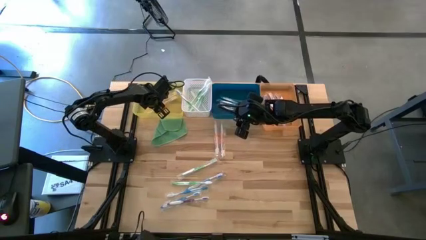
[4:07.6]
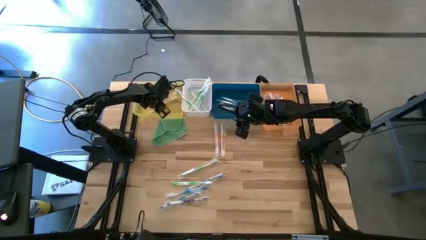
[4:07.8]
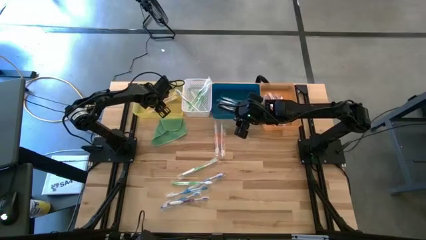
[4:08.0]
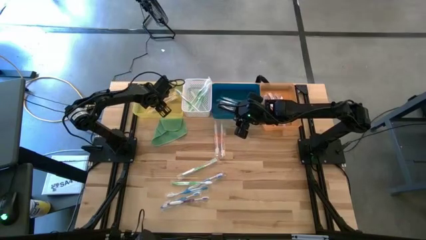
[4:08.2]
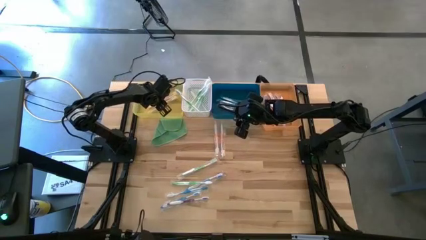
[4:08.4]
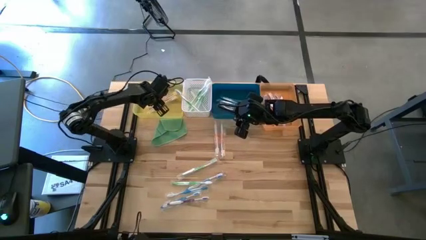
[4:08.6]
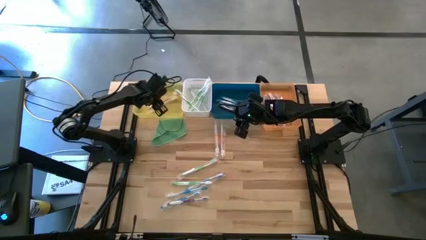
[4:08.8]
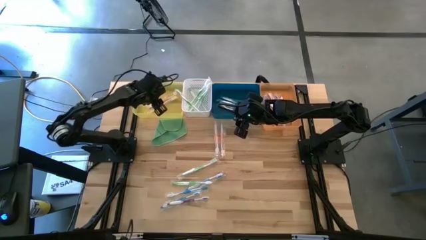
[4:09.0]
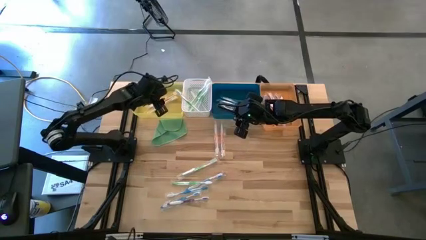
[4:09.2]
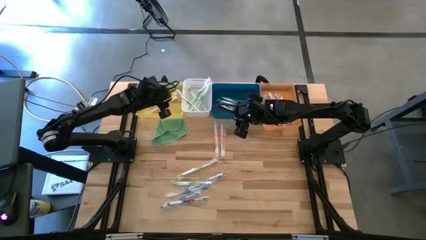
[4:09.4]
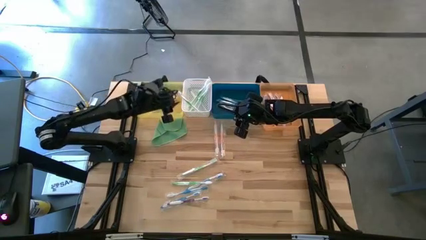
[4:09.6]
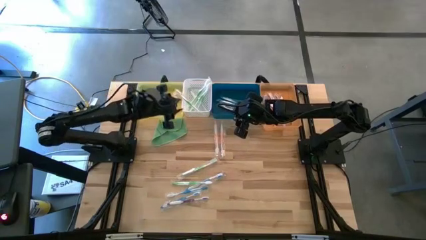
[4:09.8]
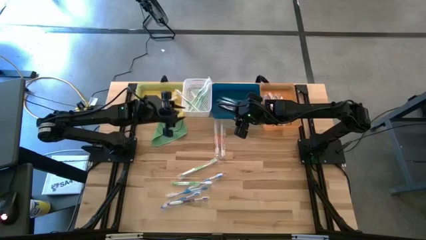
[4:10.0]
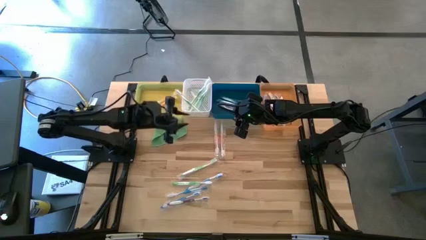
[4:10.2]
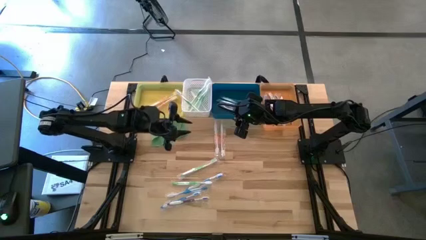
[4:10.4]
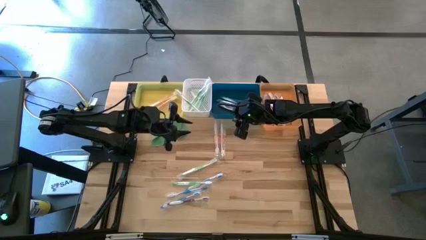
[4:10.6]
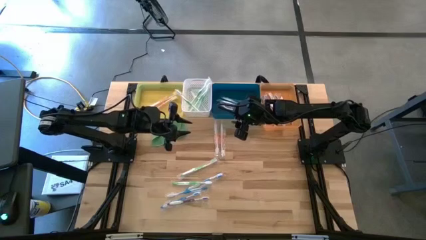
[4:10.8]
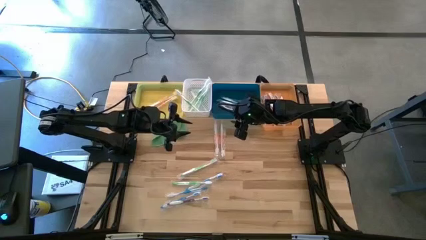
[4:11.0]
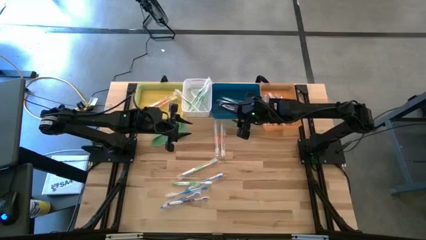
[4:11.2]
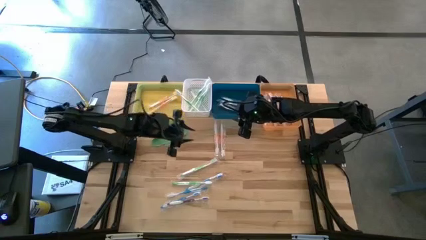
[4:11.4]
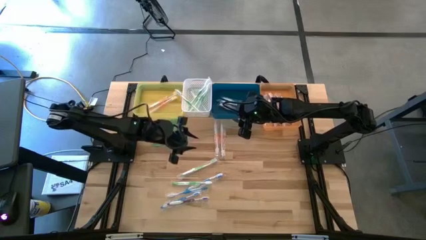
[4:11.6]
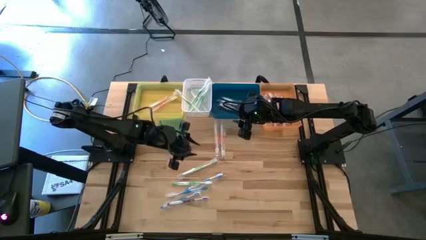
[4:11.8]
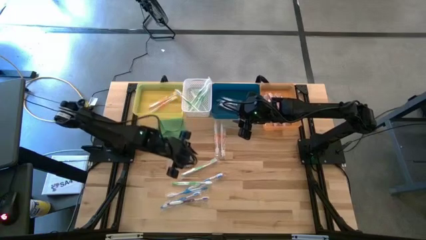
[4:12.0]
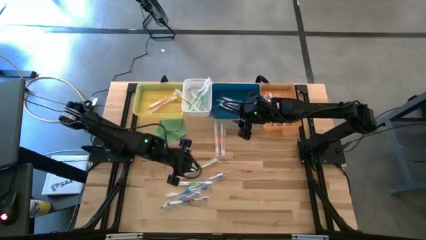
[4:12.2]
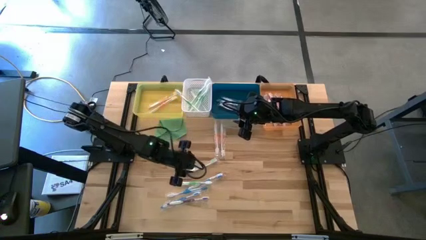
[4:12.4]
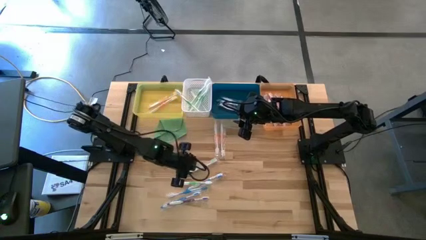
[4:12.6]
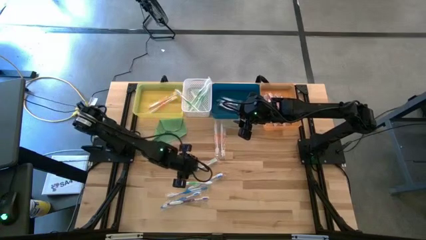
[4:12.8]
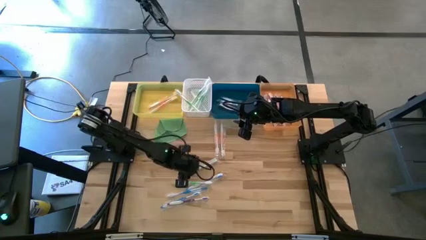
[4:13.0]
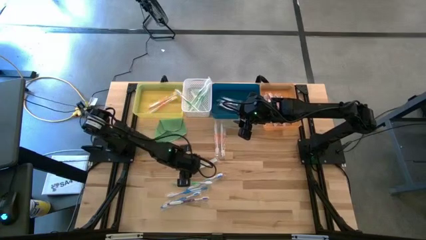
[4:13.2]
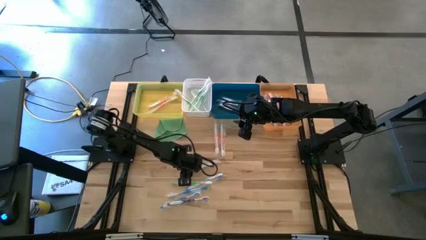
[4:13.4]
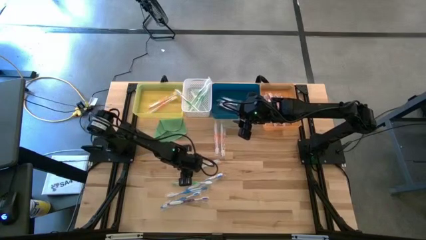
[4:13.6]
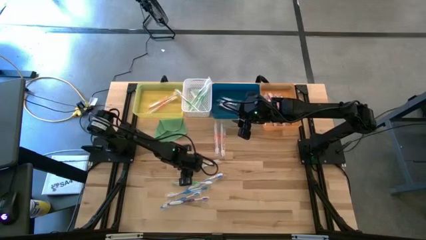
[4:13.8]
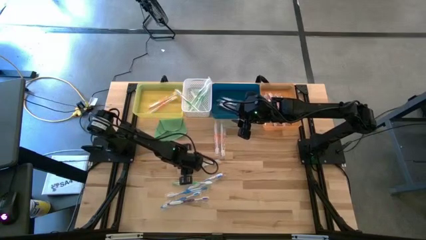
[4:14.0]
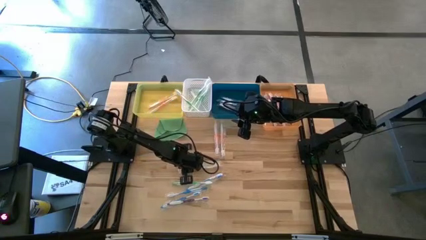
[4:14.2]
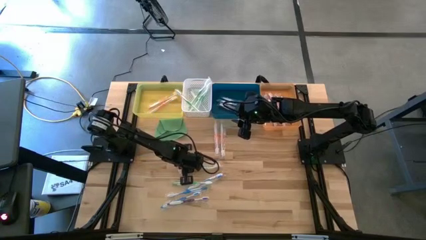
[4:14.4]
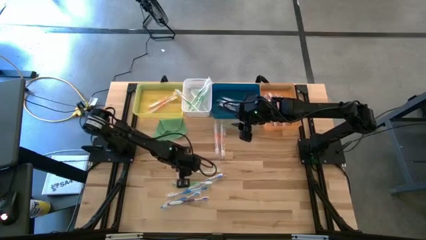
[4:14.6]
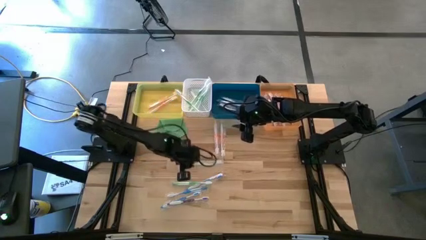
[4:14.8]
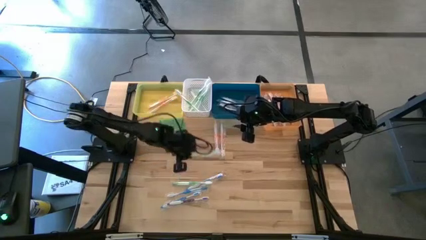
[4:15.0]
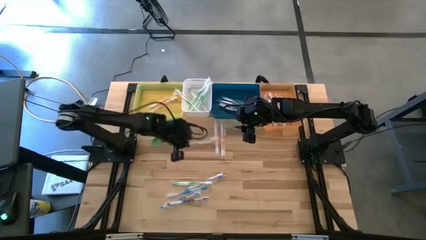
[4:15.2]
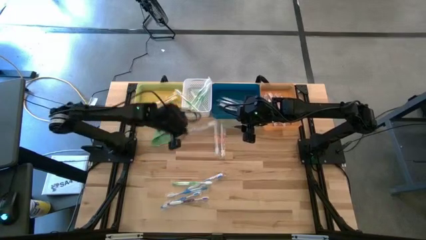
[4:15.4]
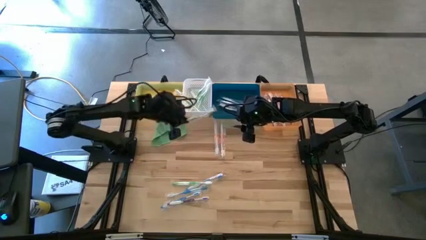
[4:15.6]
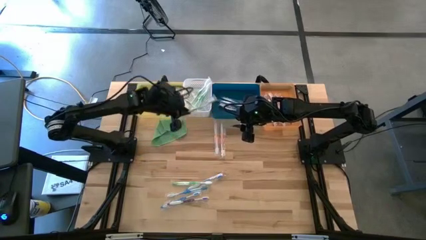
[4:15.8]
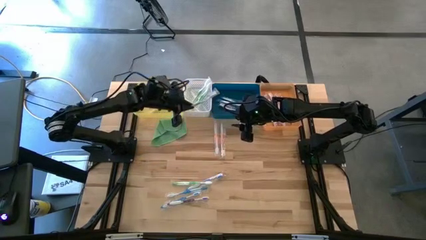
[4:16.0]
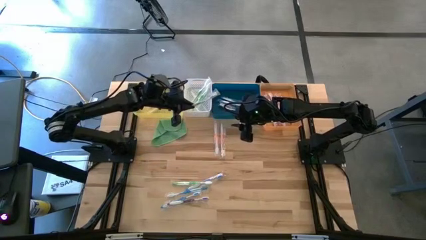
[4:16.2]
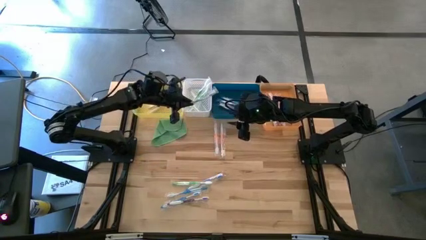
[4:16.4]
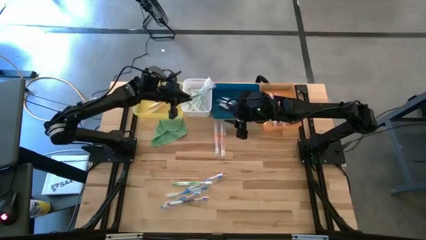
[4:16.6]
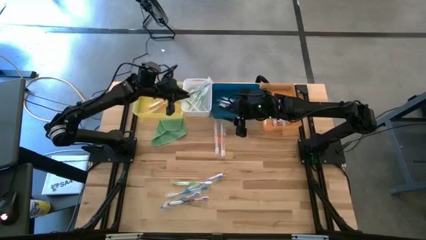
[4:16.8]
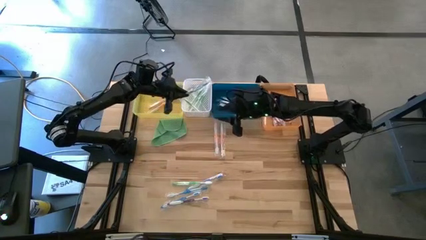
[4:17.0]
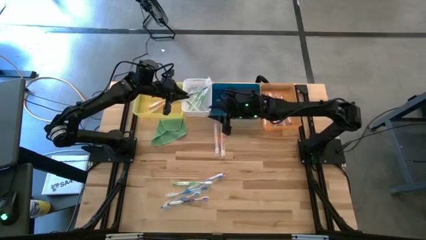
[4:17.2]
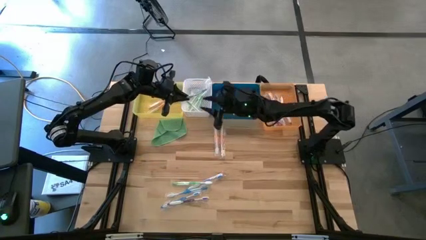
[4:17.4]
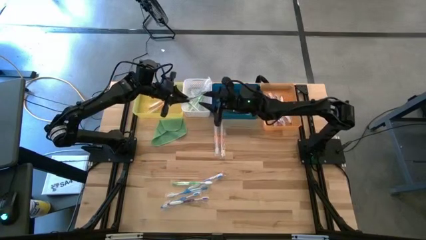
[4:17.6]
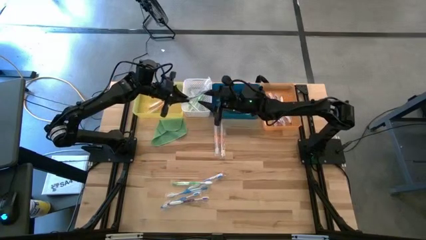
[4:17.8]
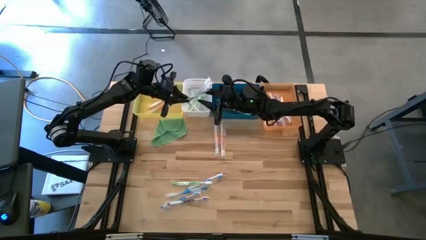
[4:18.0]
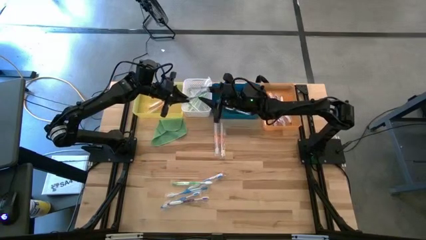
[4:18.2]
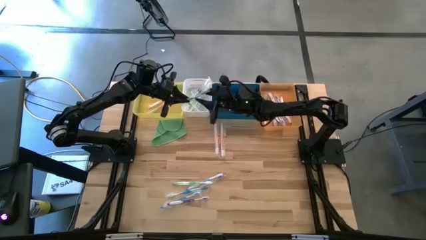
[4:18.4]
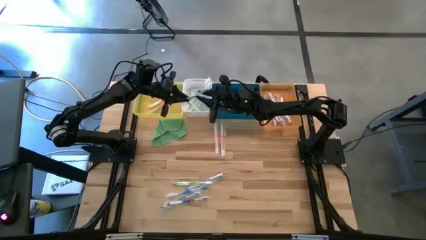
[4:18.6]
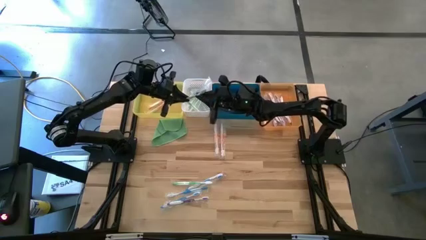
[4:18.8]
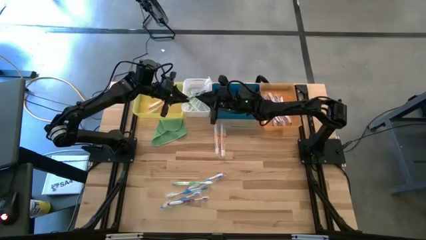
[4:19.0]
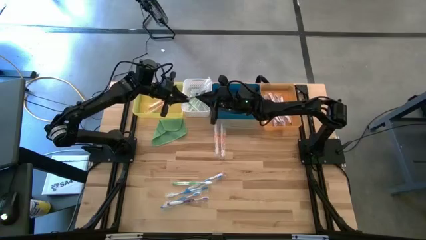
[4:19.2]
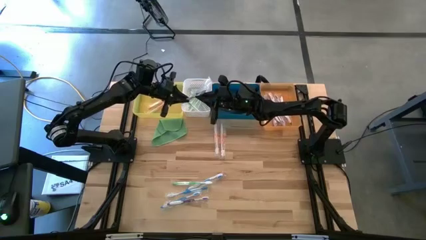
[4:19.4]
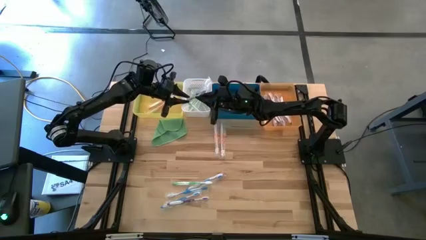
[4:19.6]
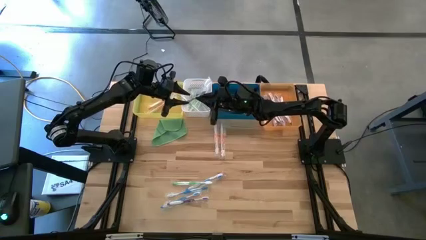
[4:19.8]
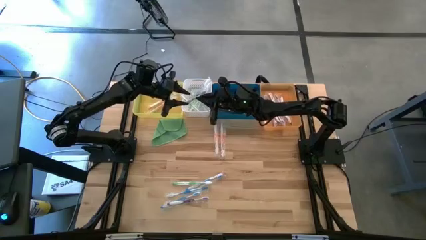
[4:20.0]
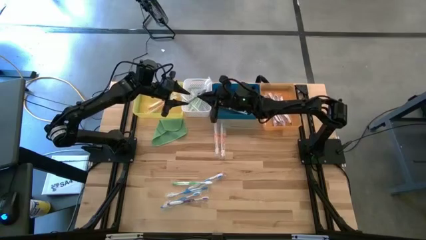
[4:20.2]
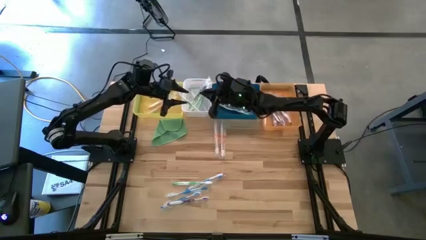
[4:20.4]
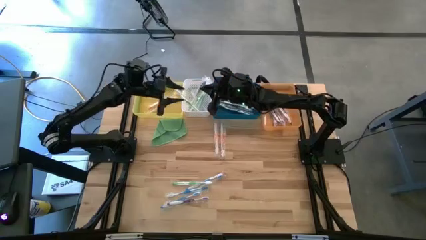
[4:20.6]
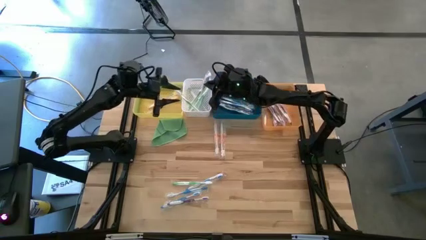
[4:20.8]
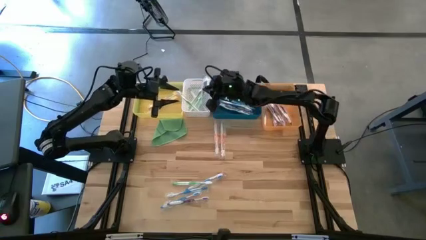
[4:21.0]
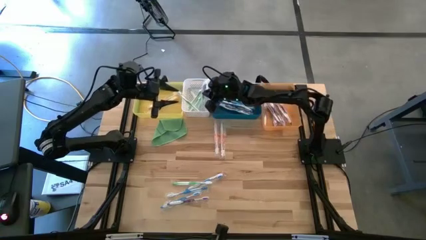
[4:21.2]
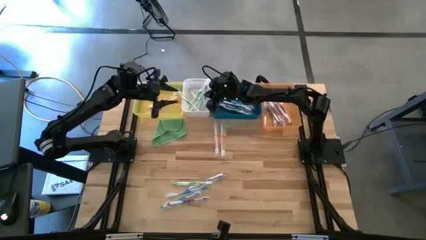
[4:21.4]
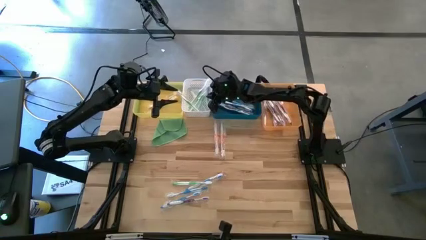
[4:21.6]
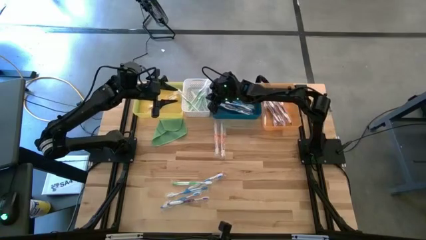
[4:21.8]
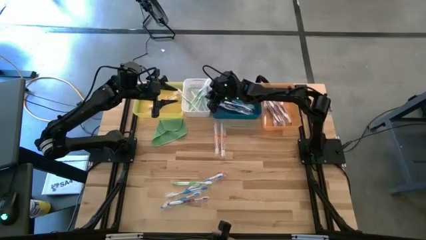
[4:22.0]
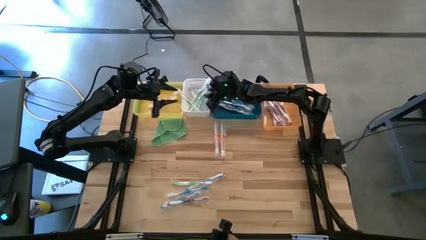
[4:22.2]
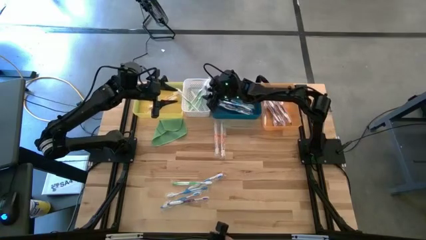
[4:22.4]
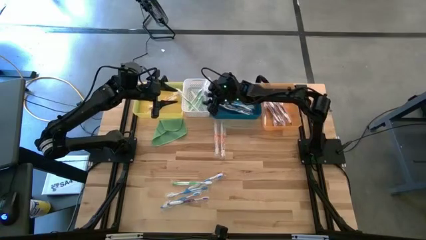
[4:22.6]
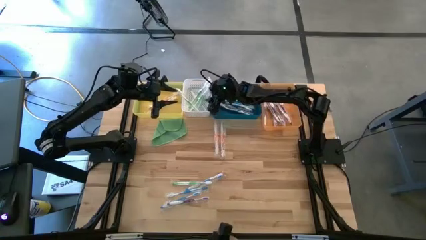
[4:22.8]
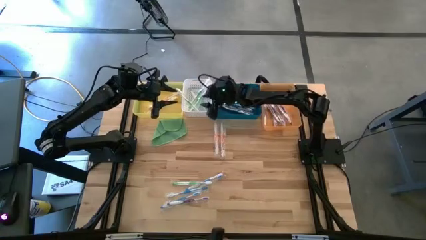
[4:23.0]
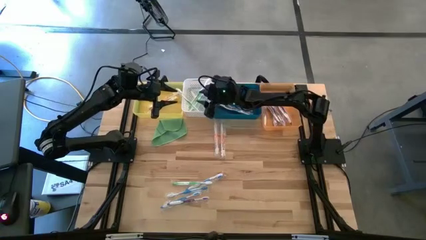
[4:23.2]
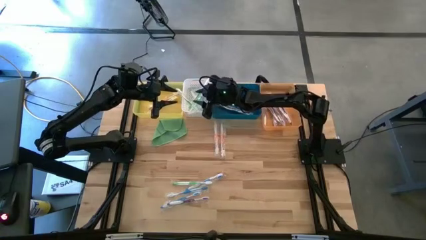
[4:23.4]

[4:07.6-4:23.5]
Task: Pick & Place Toothbrushes
Put the green toothbrush into the white bin

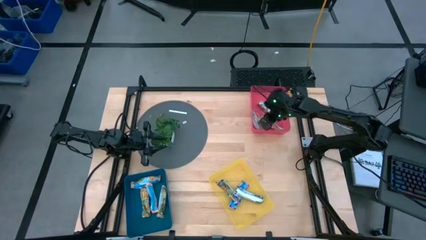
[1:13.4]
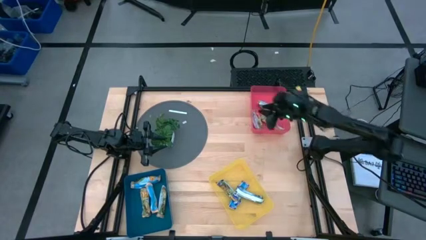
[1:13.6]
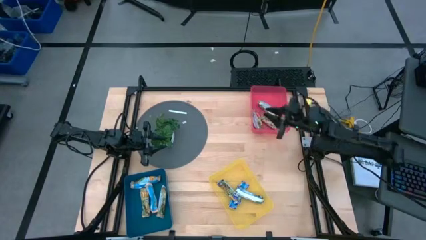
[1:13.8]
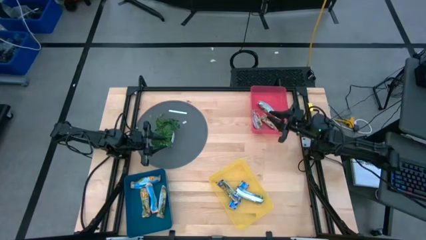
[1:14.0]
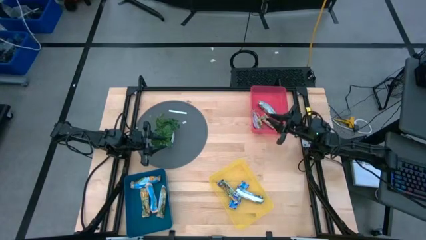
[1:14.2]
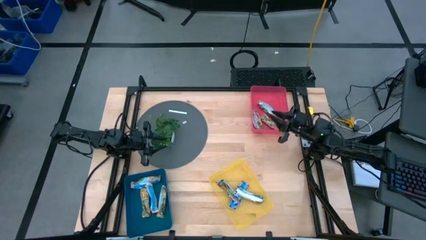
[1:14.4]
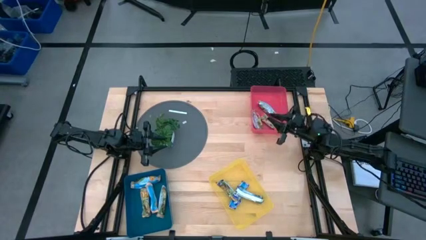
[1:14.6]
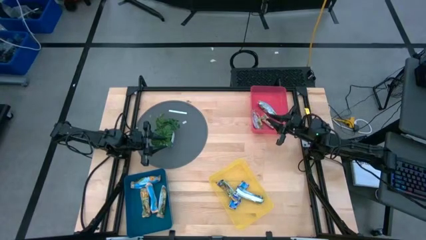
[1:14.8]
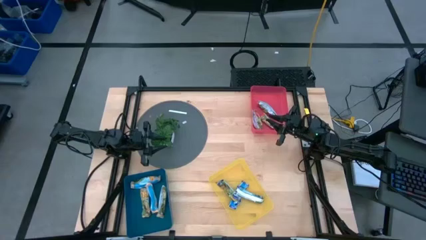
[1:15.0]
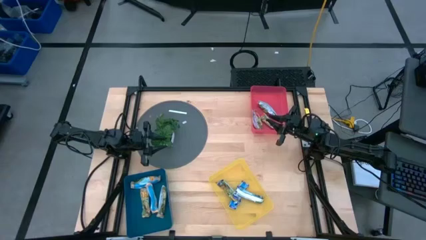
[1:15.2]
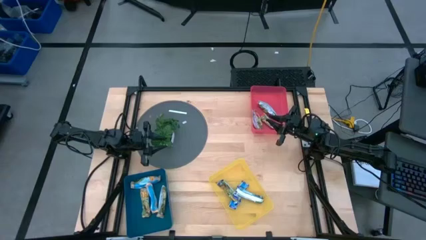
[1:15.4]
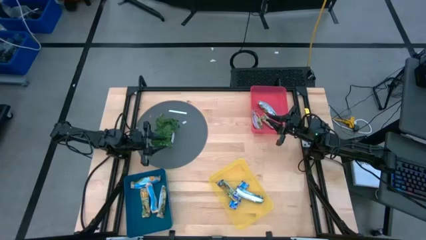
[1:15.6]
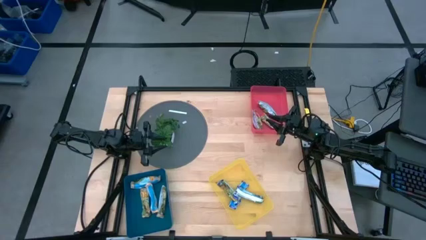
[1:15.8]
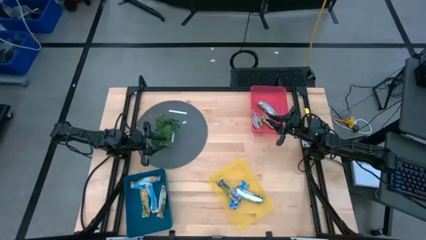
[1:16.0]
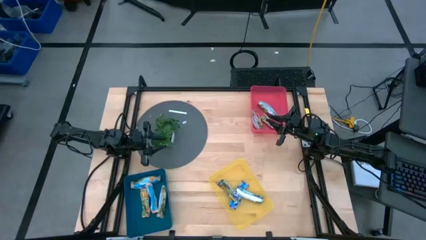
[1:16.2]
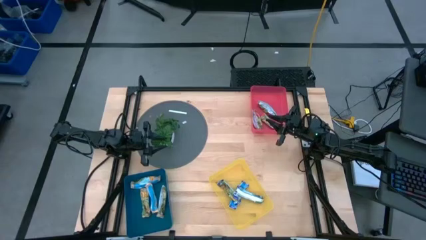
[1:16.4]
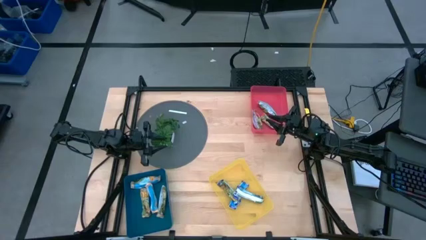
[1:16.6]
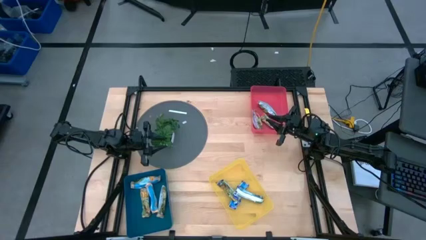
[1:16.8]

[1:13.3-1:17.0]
Task: Pick and place Granola Bars by type
Return to Home Position
